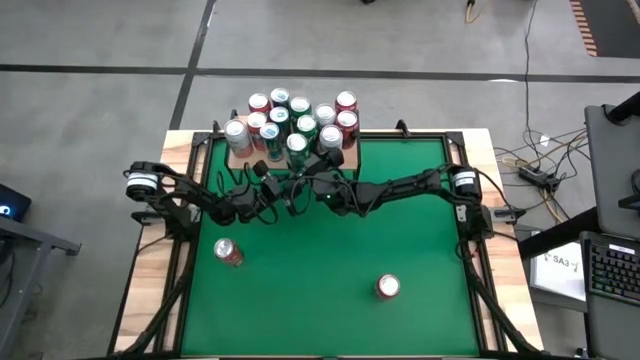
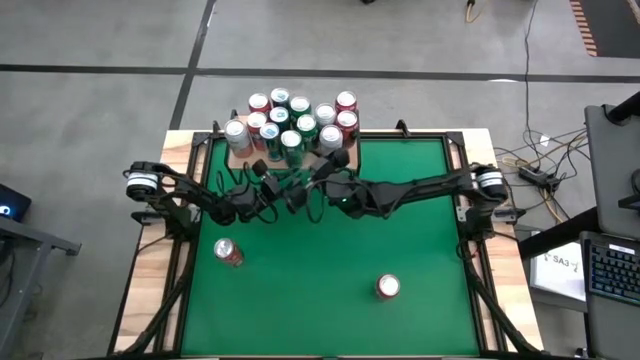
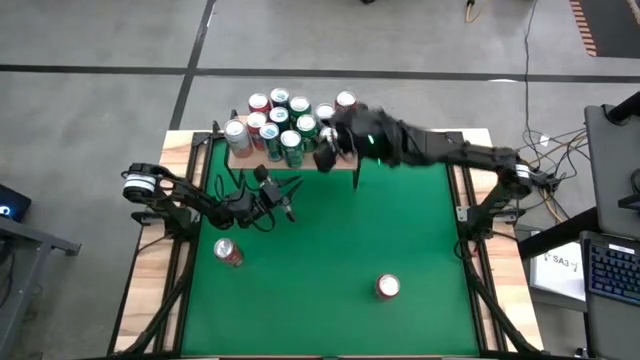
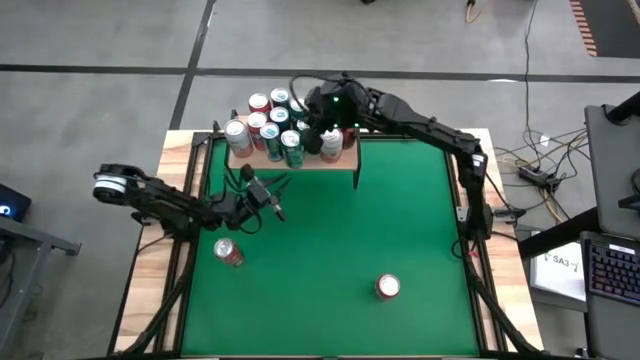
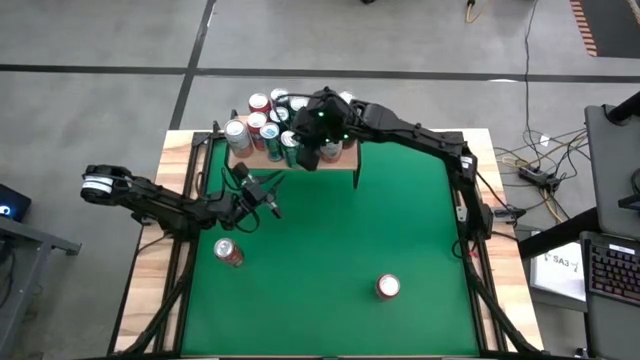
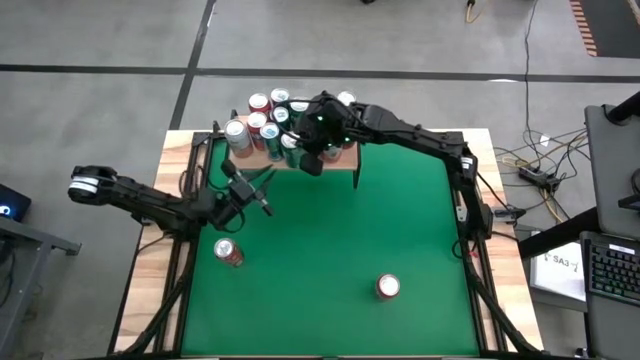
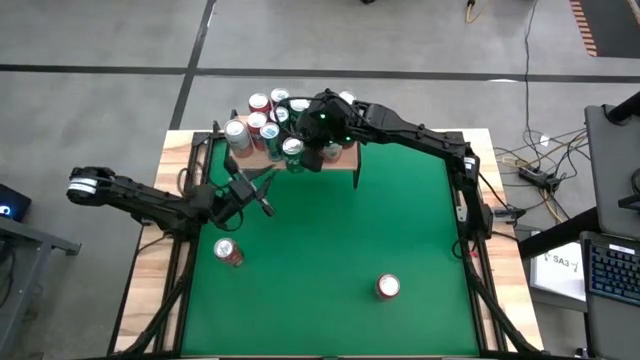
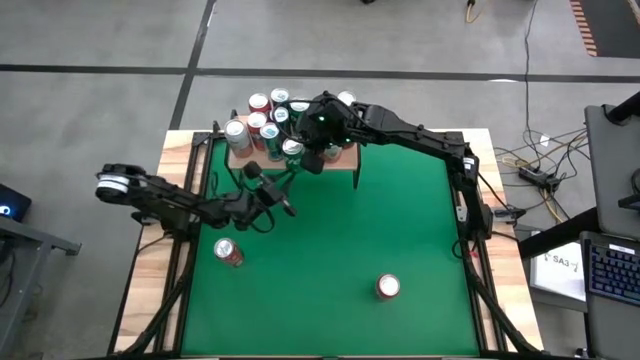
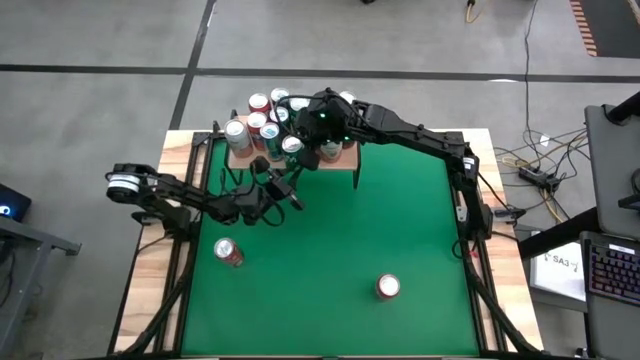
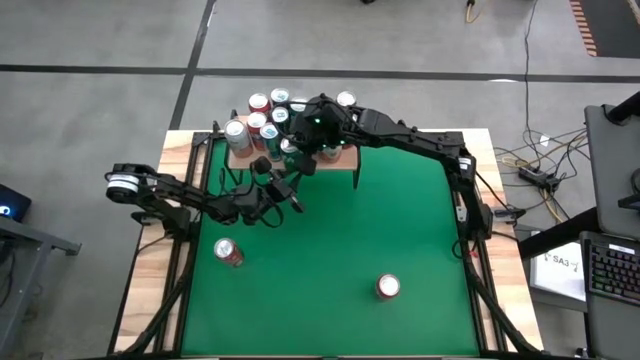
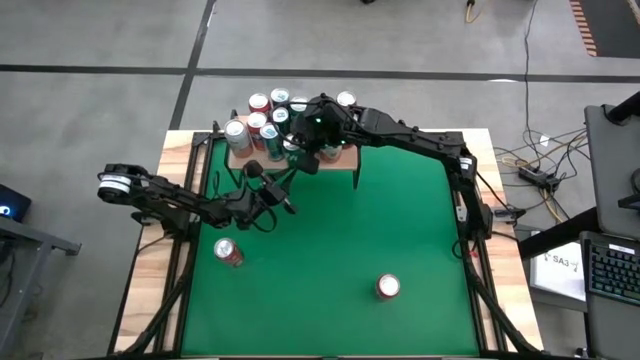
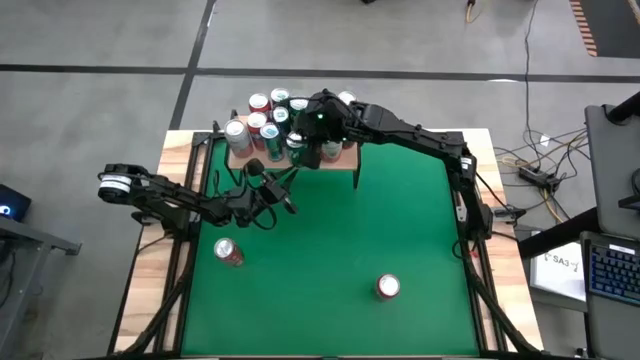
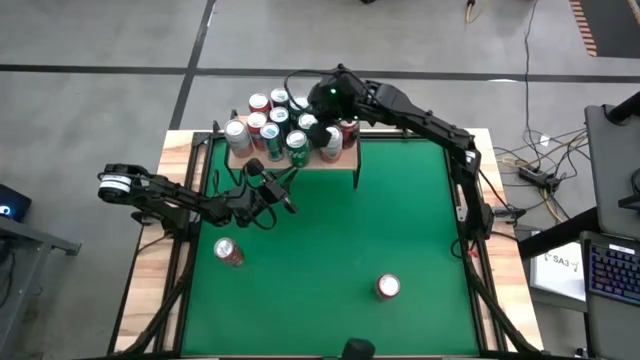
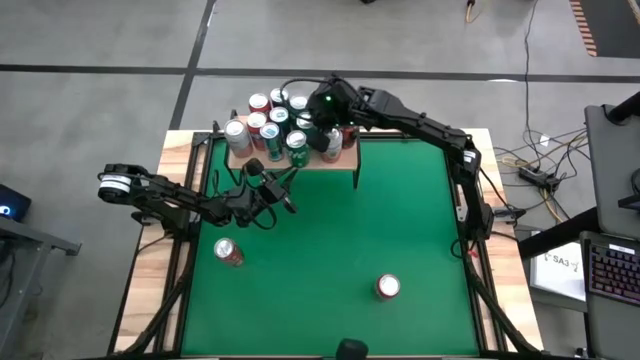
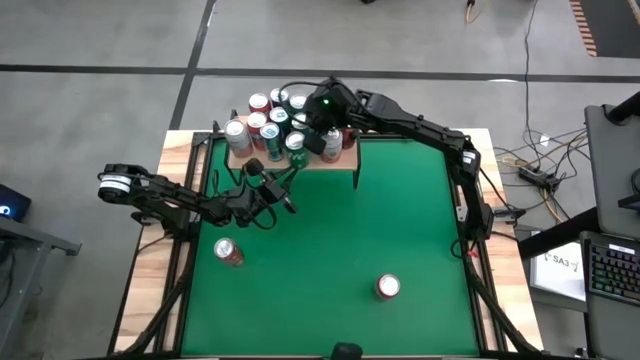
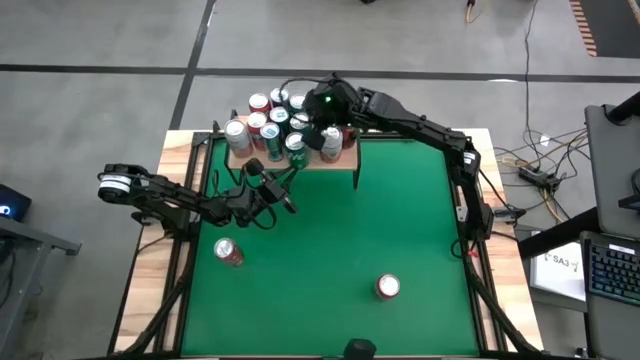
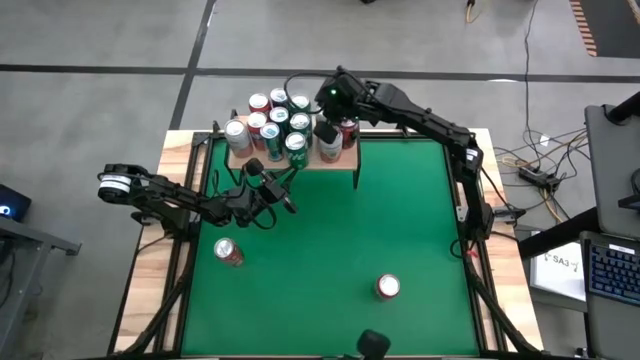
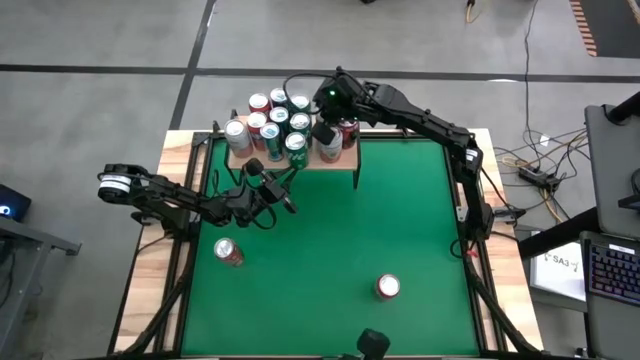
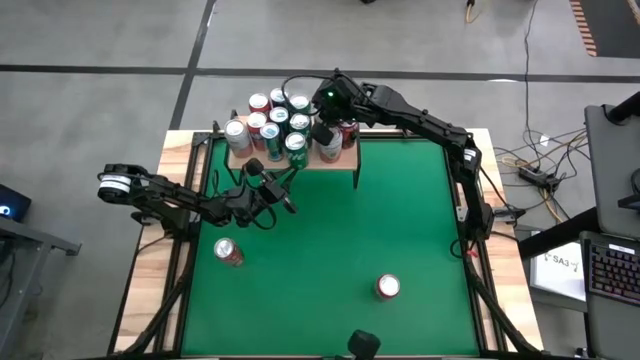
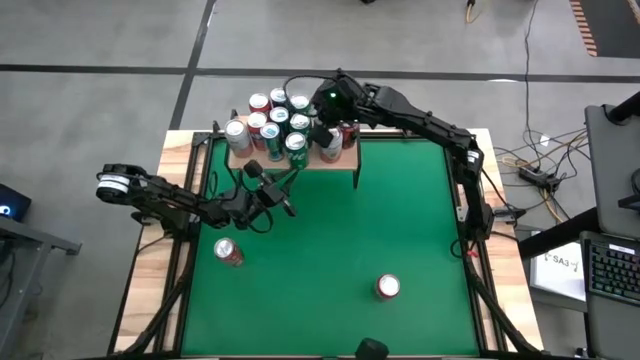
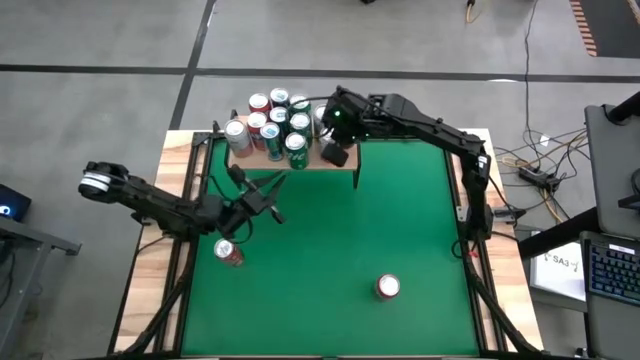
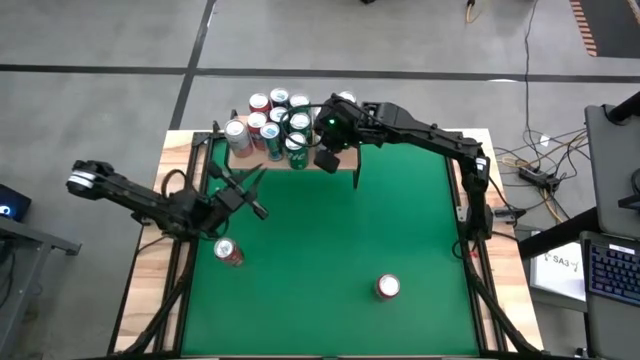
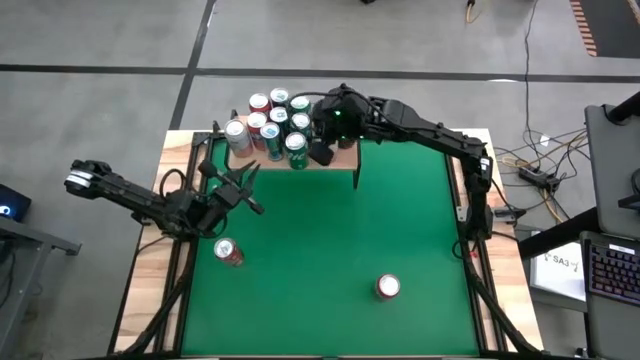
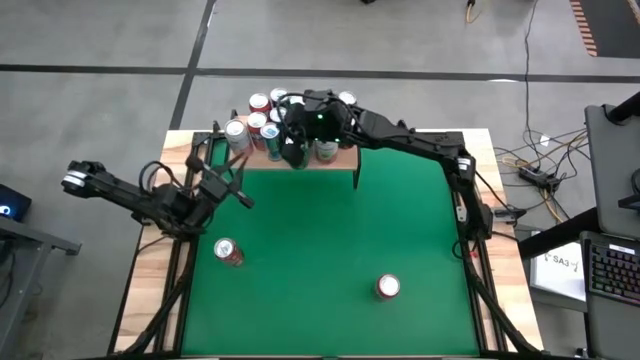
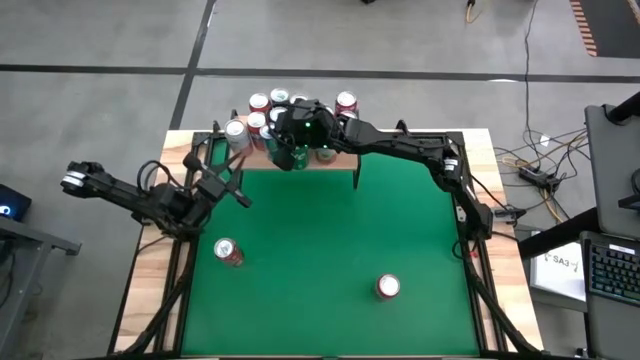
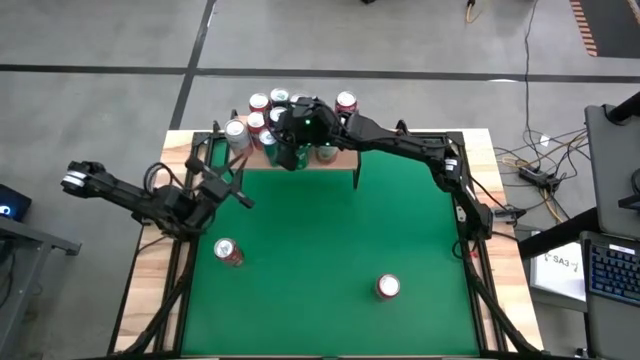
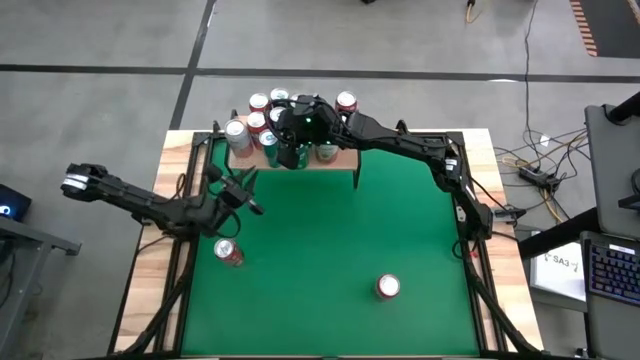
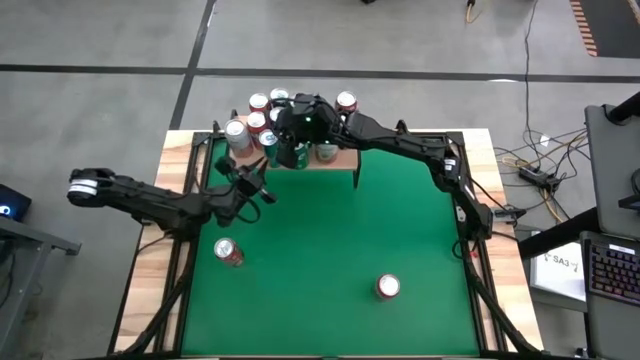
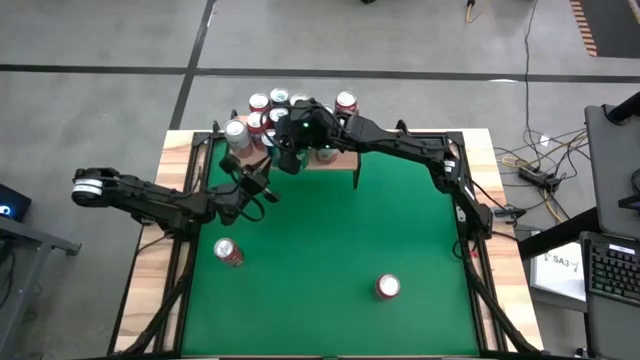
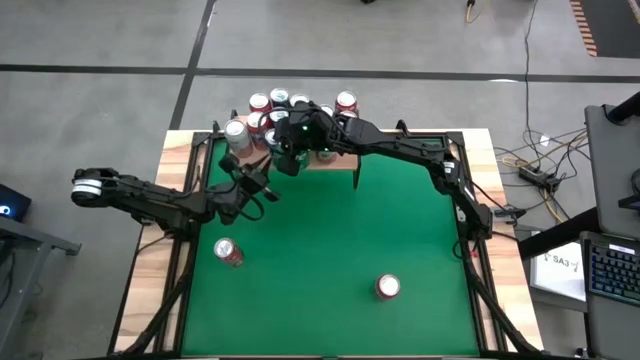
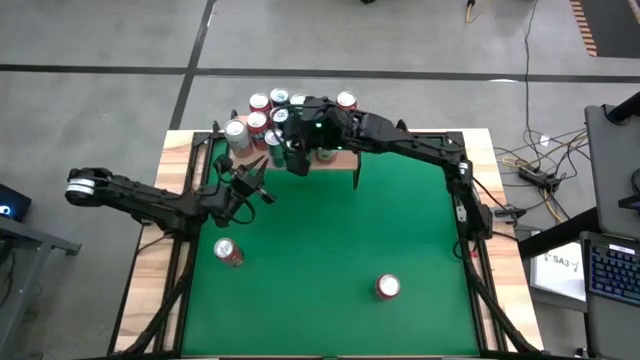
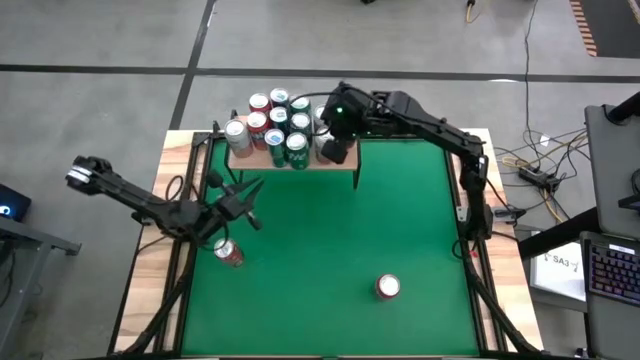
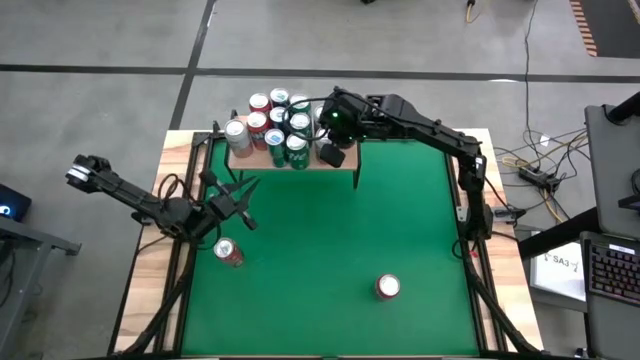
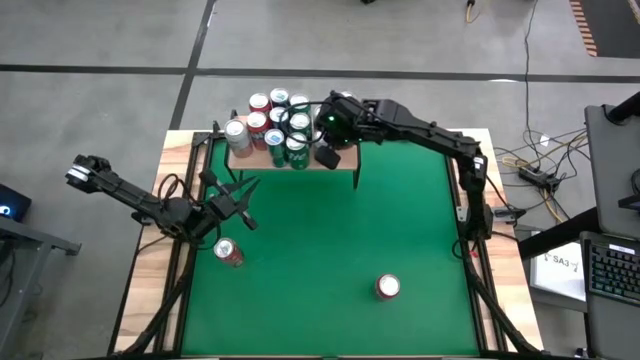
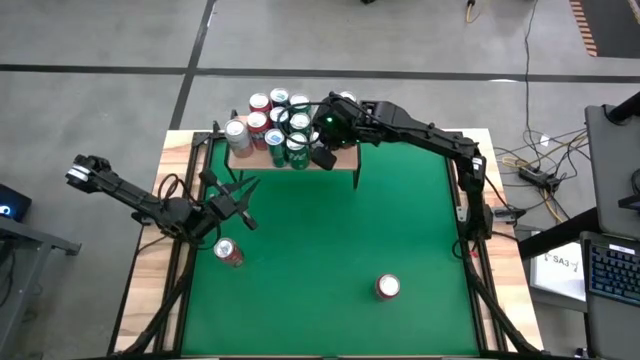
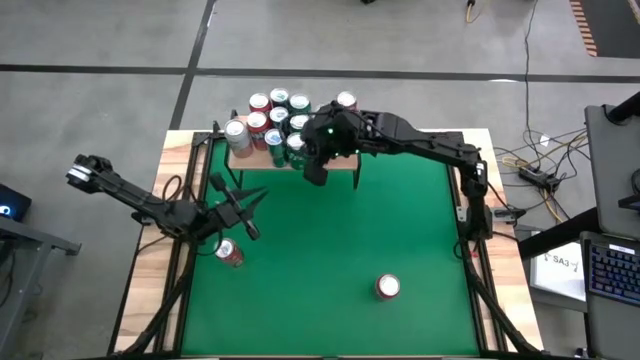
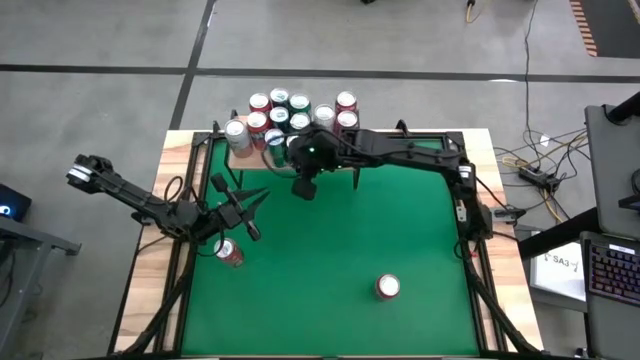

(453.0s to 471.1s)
Task: Place canned beverage on shelf
Put the orange can on the shelf

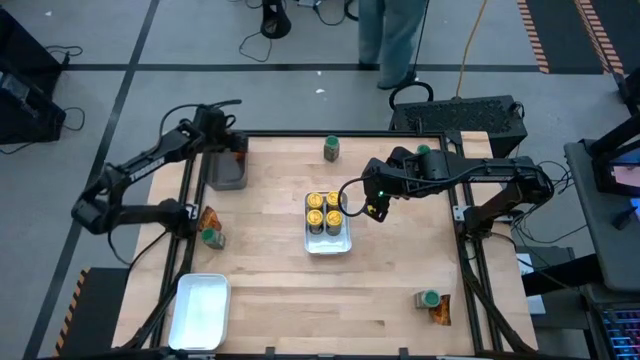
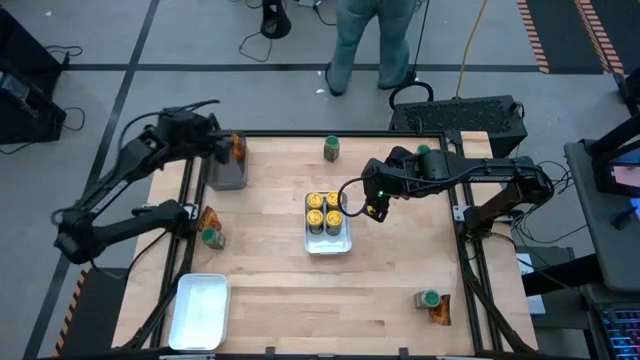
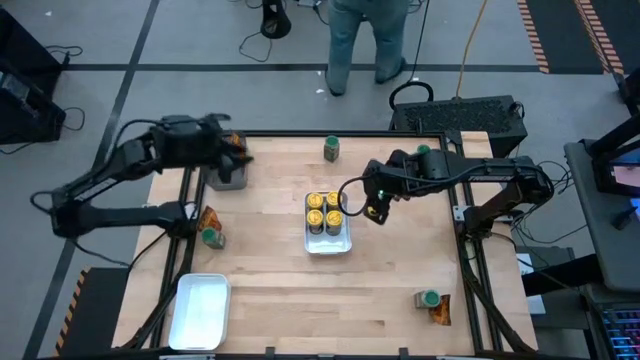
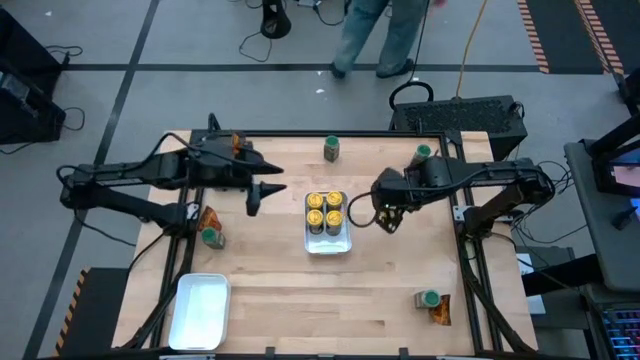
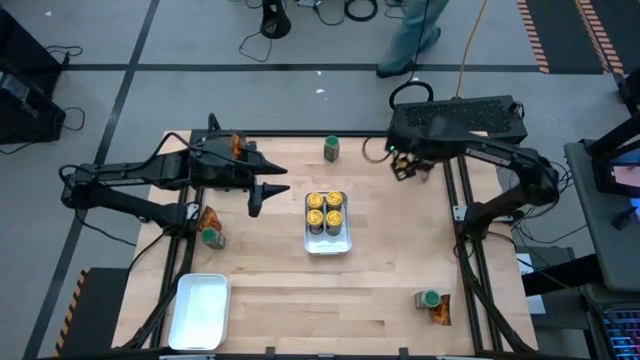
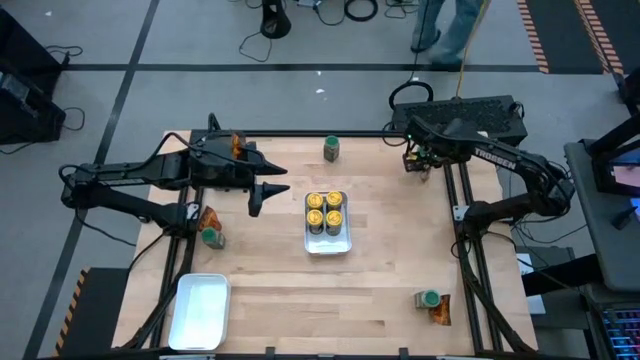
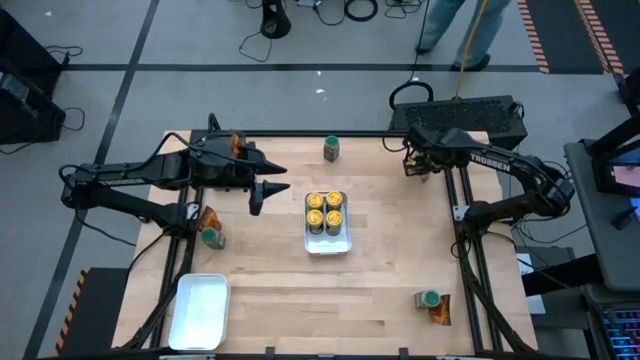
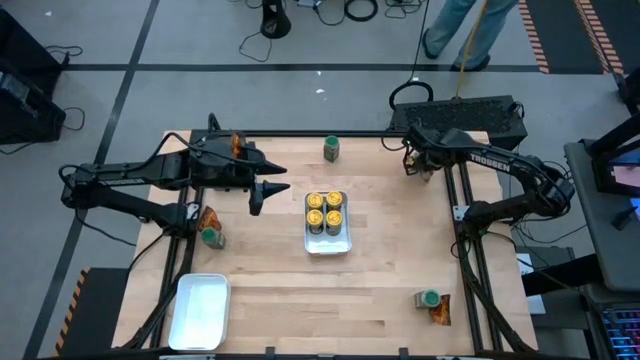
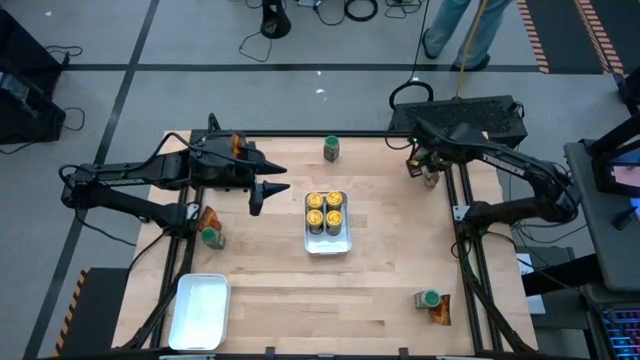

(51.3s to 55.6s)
Task: Sort spices by type
Put the top right brown spice pouch into the black transparent bin
